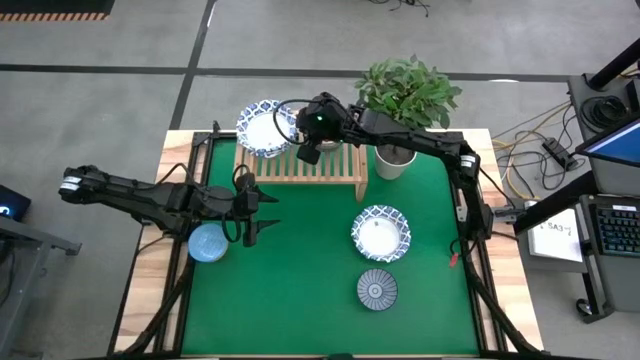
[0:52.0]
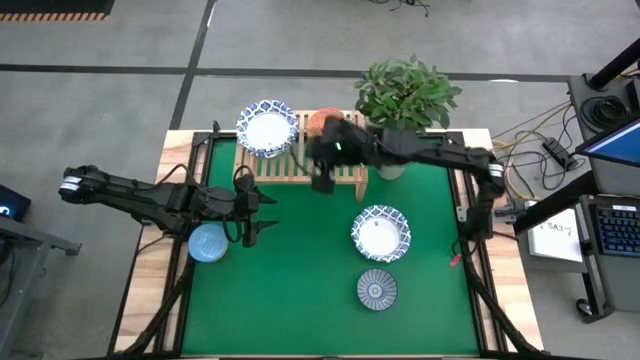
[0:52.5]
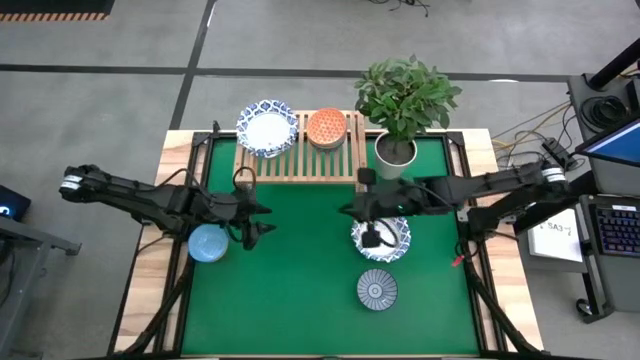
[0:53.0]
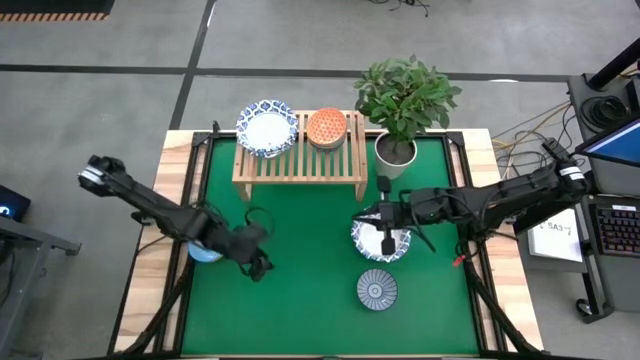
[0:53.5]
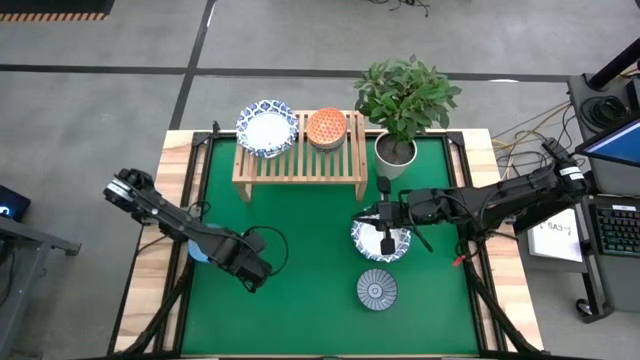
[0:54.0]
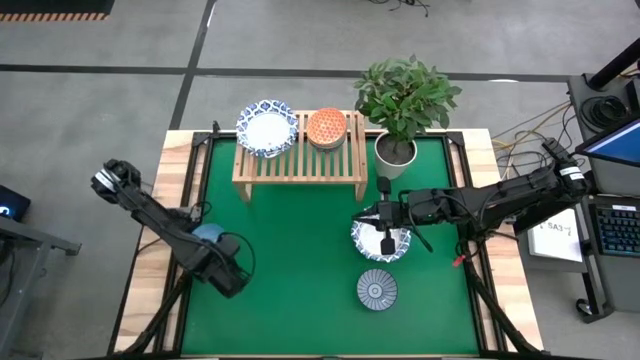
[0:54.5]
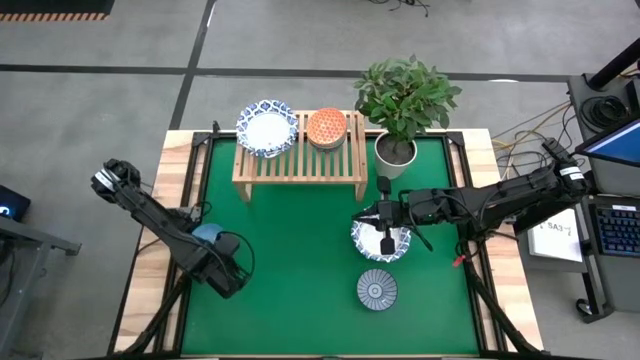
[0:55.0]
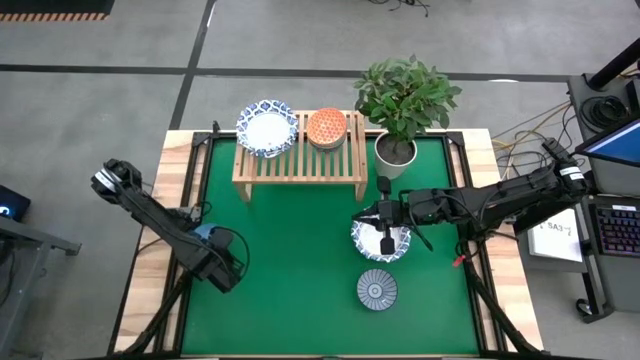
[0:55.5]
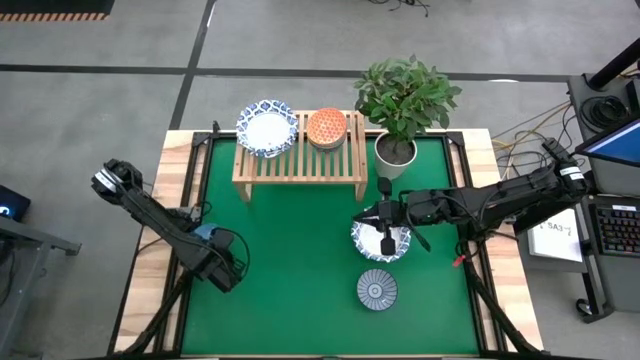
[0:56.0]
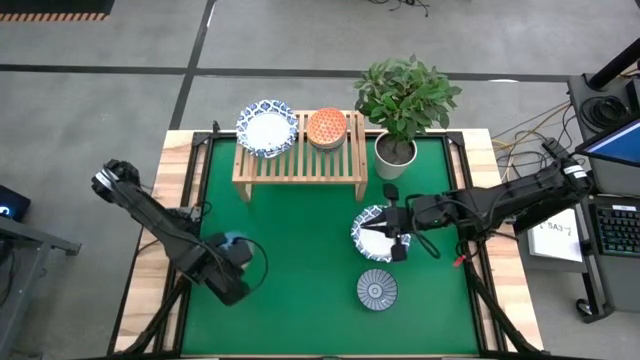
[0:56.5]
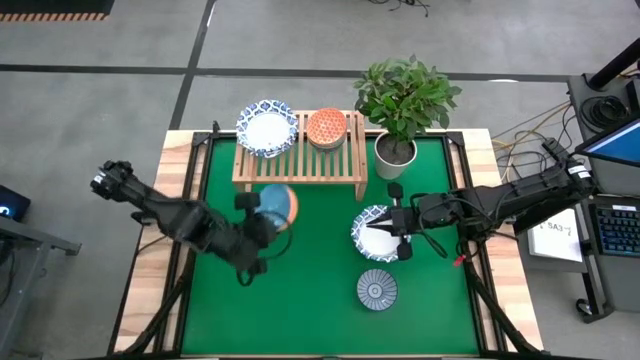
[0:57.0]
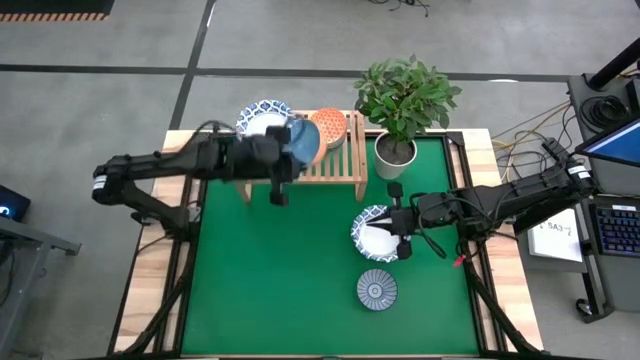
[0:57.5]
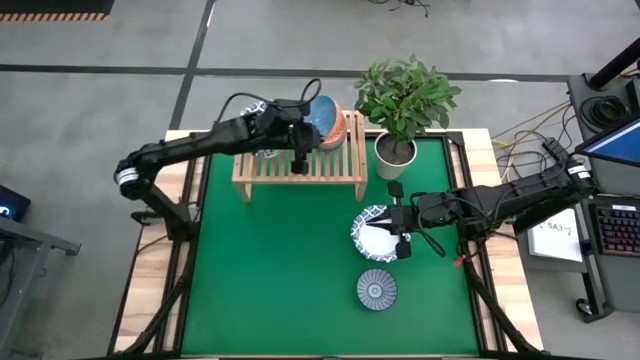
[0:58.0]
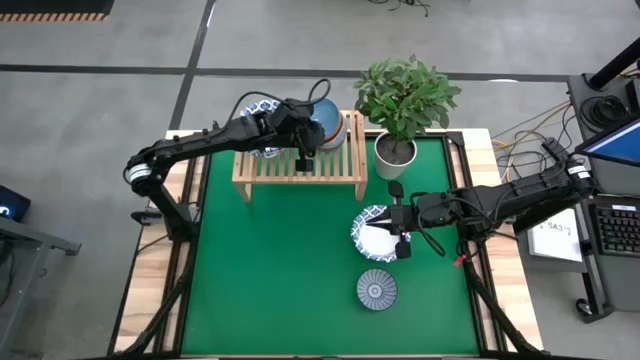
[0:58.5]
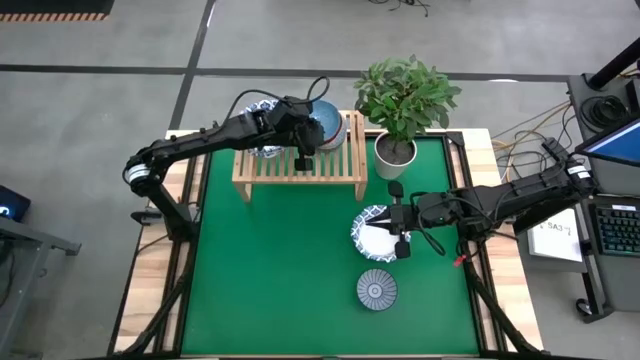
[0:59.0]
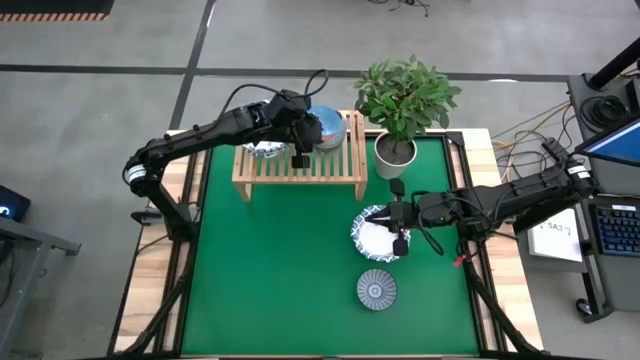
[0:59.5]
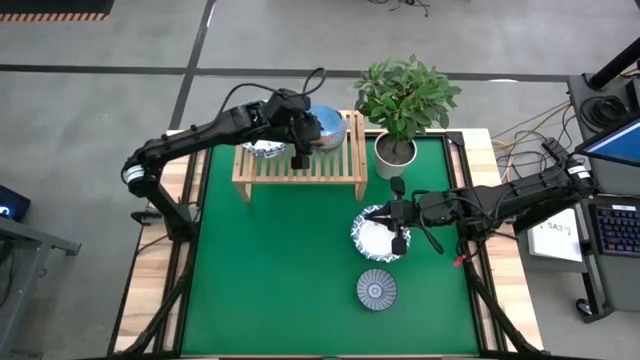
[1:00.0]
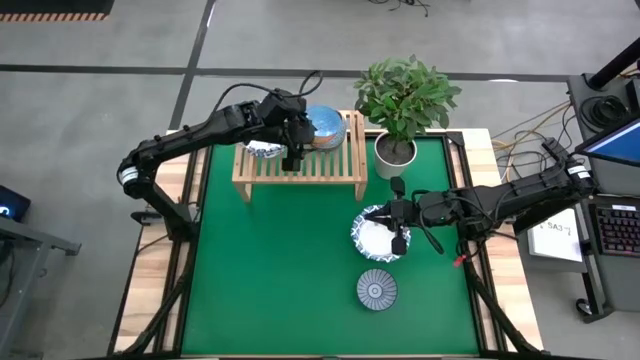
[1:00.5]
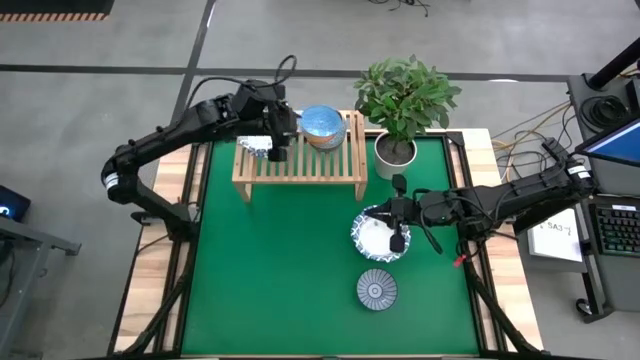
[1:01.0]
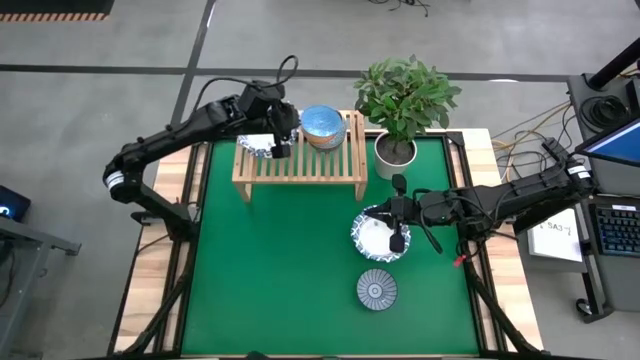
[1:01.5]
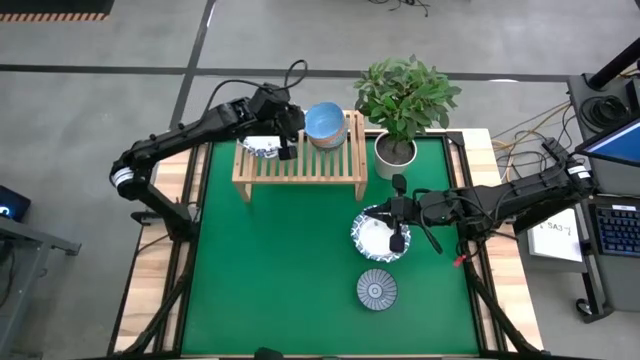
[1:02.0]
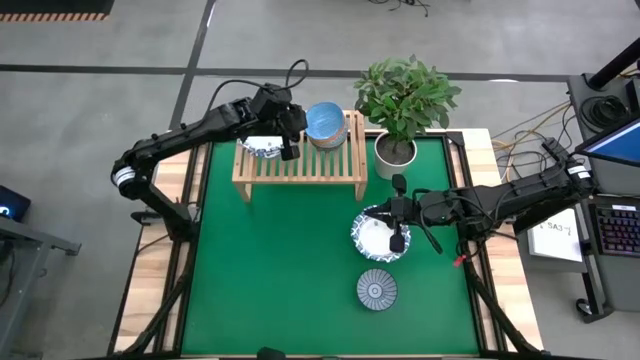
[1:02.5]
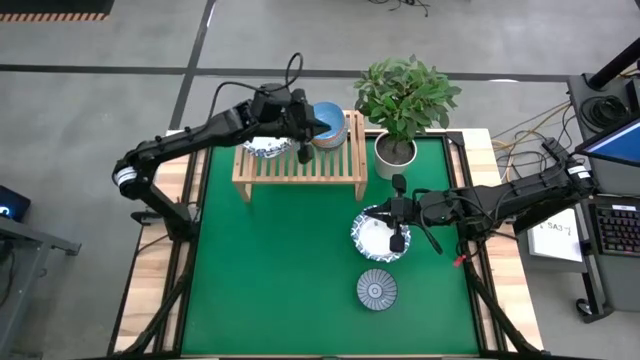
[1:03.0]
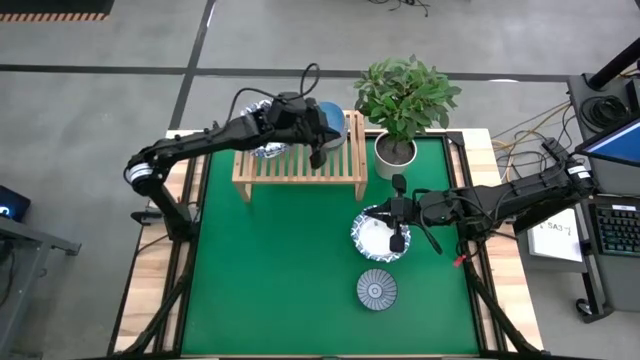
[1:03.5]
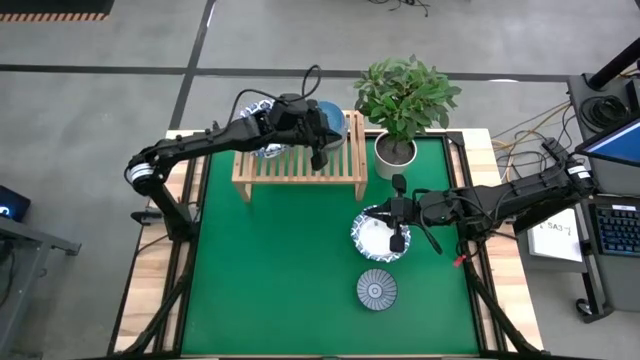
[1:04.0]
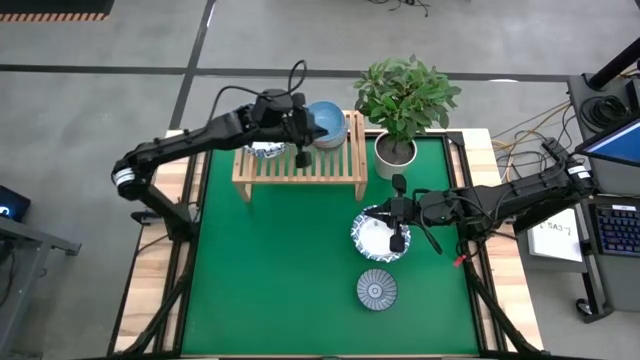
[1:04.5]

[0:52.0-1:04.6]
Task: Place and stack bowls onto a shelf
Stack the light blue bowl on top of the orange bowl on the shelf

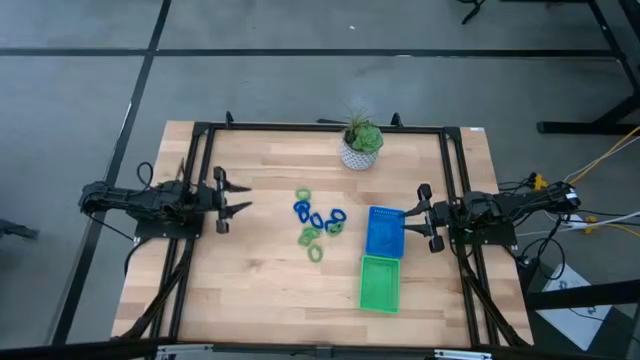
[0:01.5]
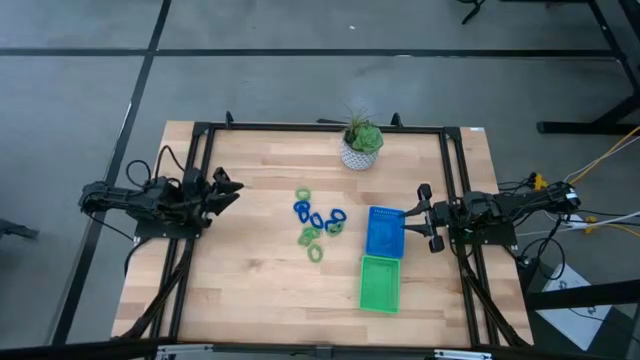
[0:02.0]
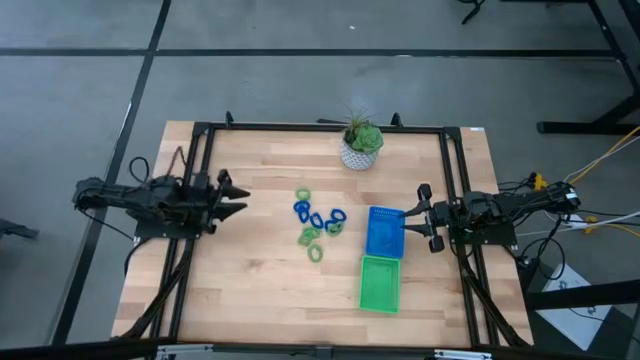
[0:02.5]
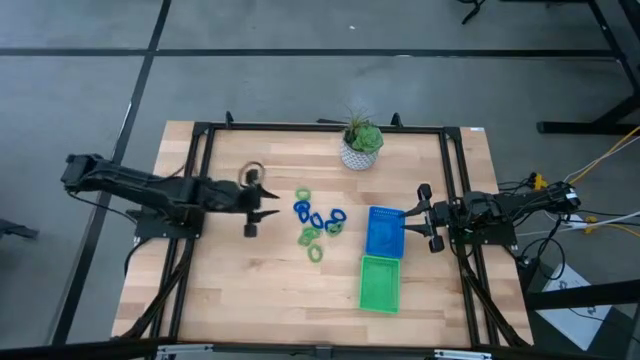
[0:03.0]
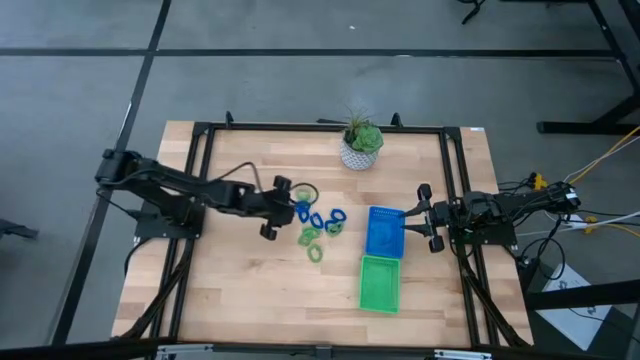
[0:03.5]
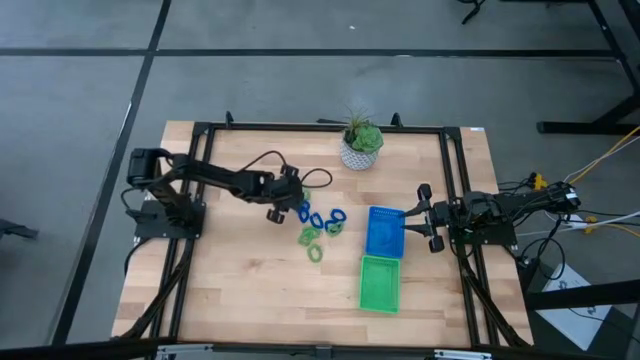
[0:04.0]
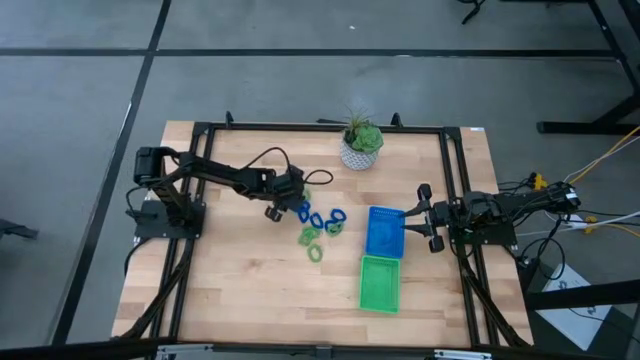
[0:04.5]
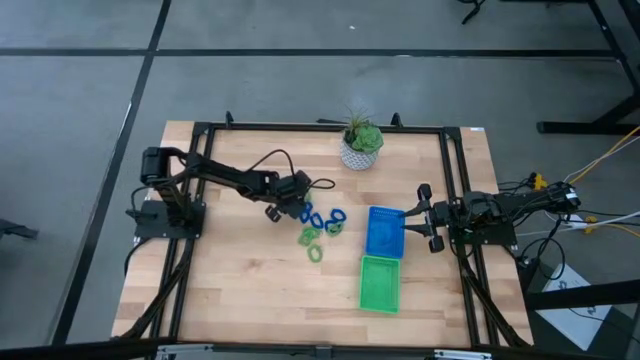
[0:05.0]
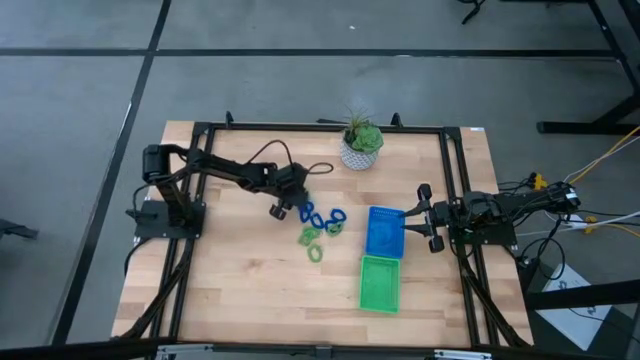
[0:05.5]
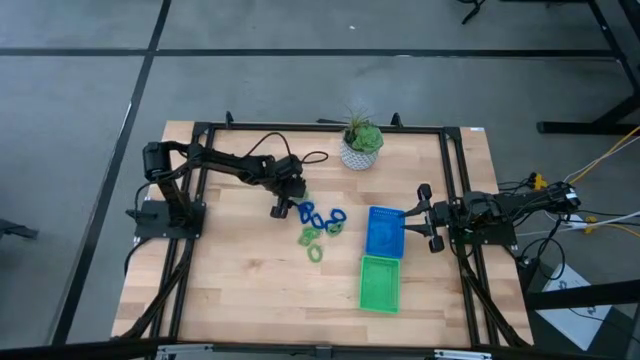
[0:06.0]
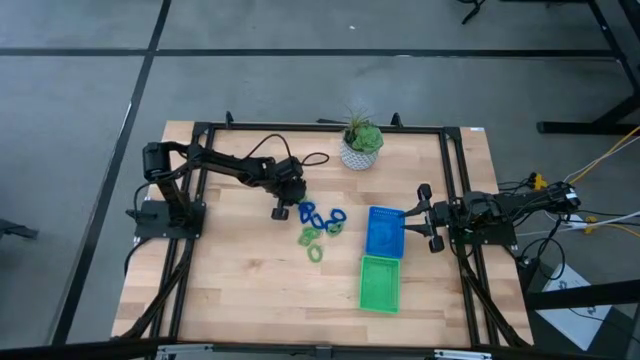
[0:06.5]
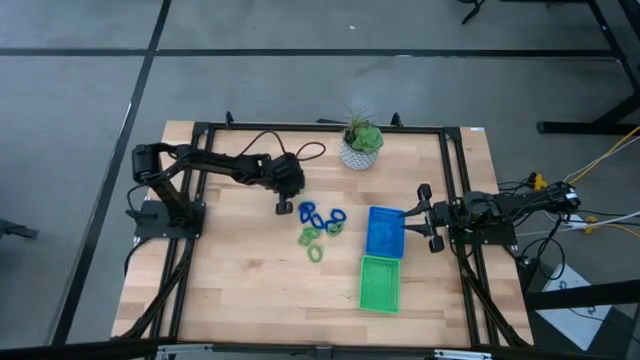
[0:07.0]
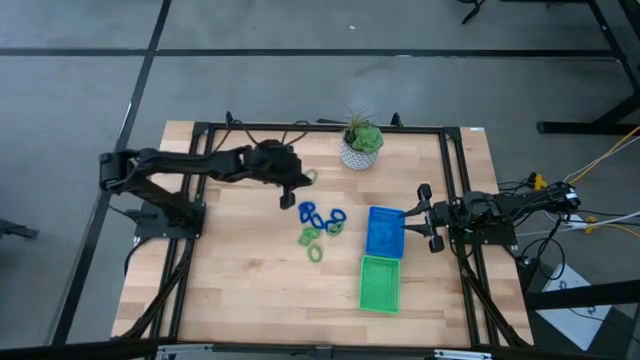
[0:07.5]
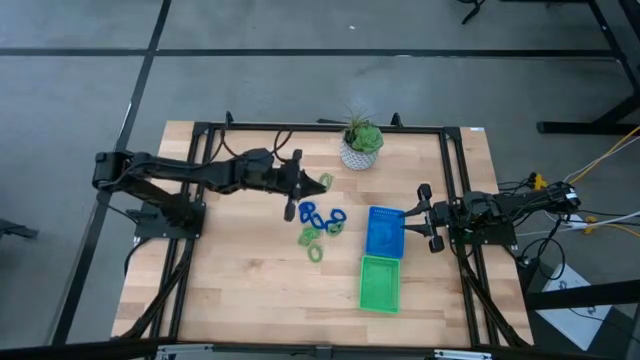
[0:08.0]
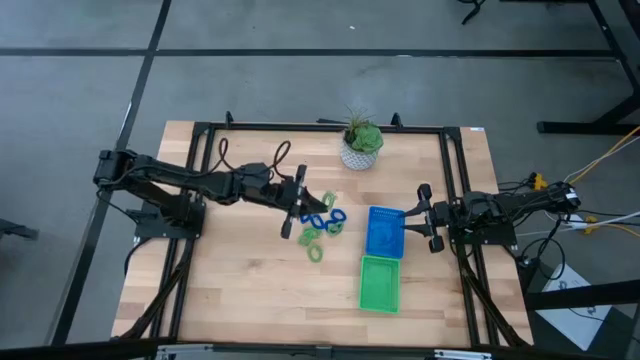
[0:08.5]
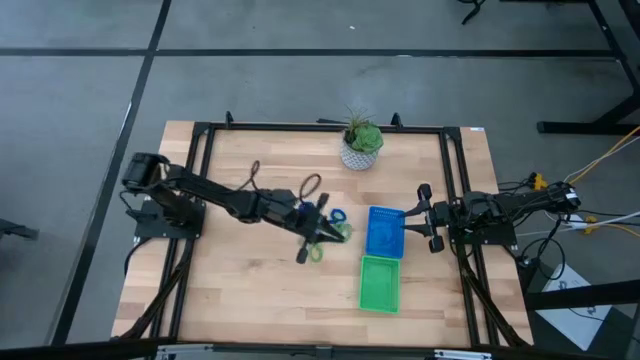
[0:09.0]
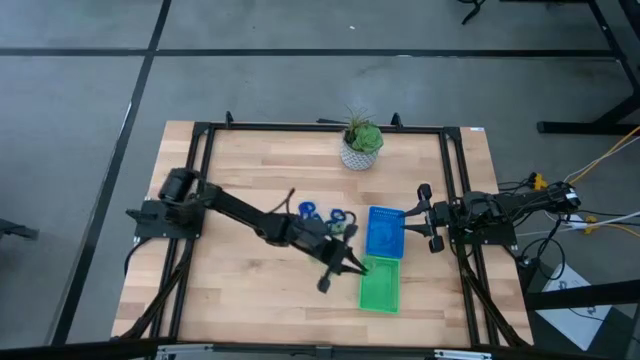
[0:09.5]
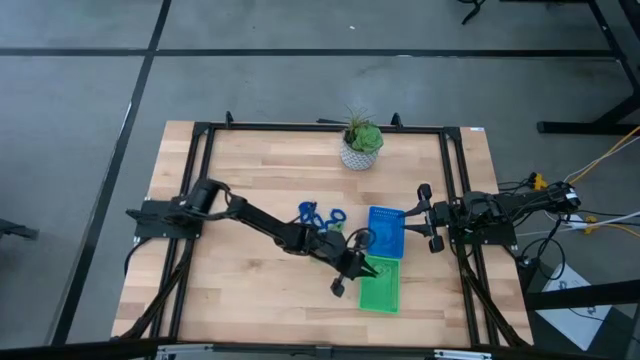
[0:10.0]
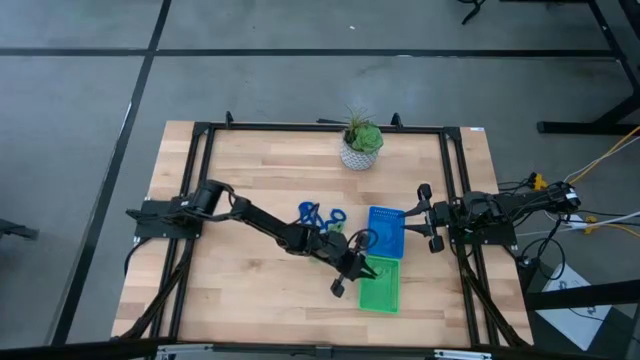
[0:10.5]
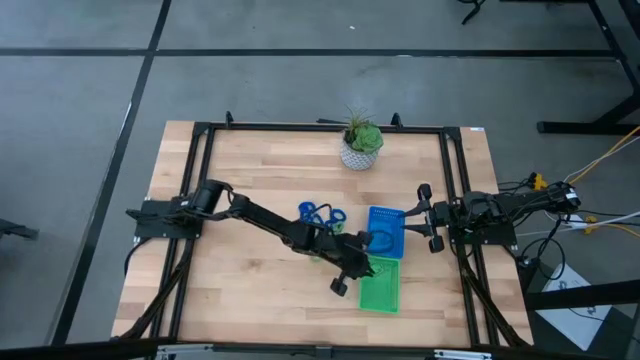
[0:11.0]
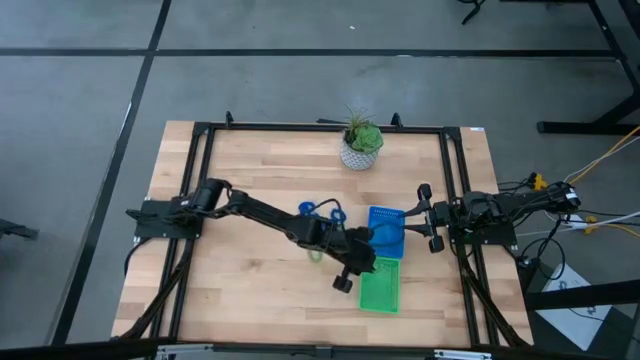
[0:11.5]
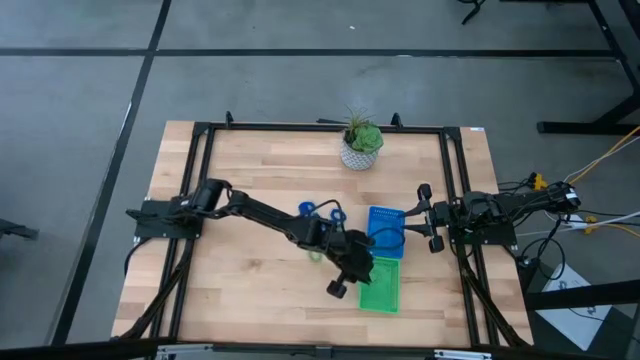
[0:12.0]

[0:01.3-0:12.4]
Task: Sort spring keychains
Put the green spring keychain into the green bin
